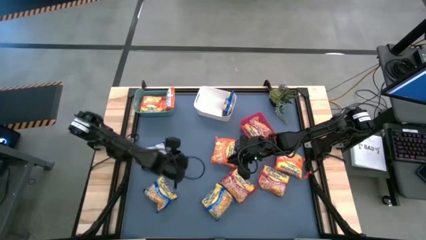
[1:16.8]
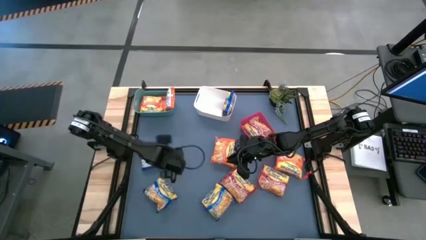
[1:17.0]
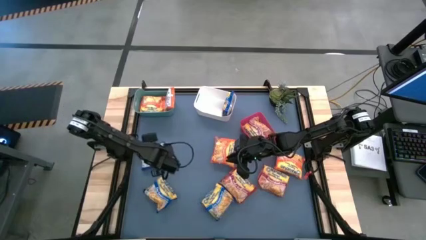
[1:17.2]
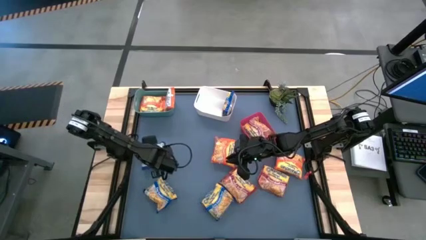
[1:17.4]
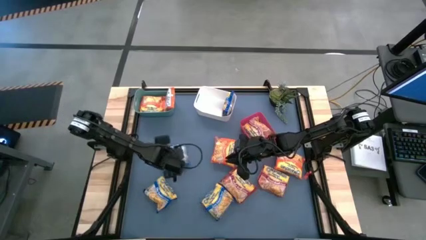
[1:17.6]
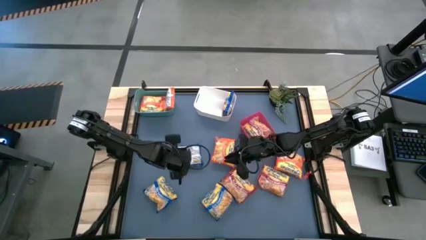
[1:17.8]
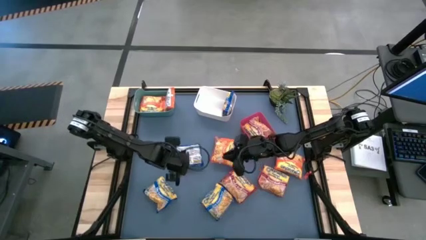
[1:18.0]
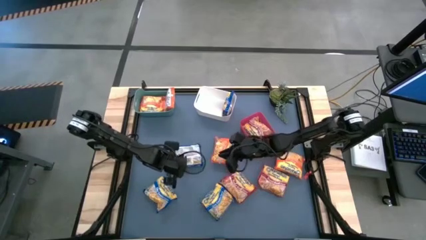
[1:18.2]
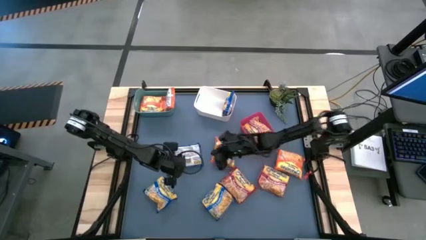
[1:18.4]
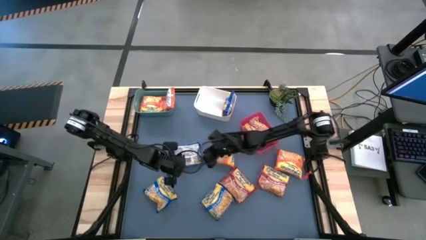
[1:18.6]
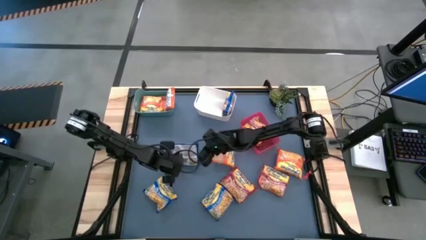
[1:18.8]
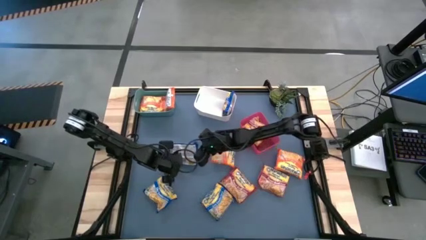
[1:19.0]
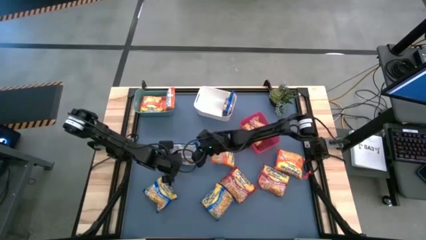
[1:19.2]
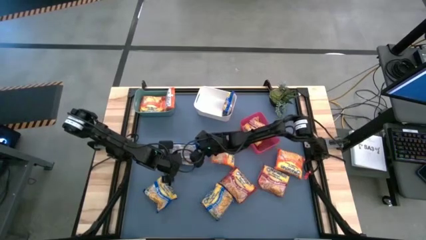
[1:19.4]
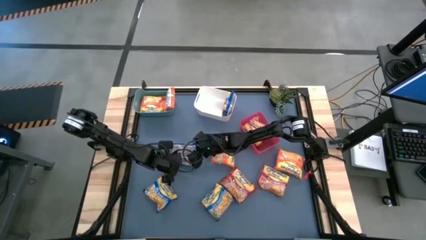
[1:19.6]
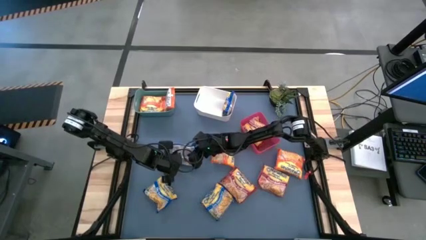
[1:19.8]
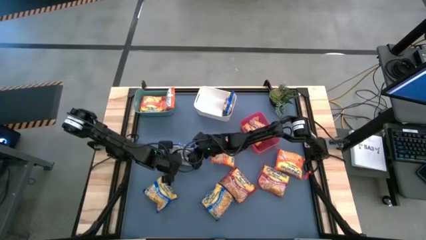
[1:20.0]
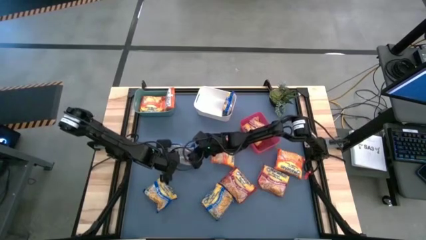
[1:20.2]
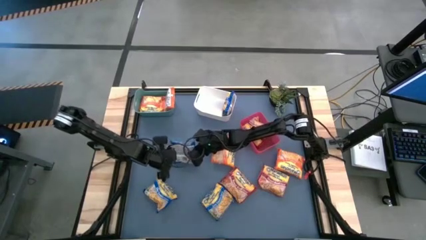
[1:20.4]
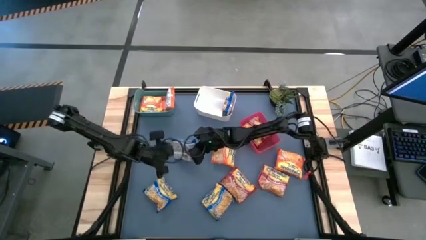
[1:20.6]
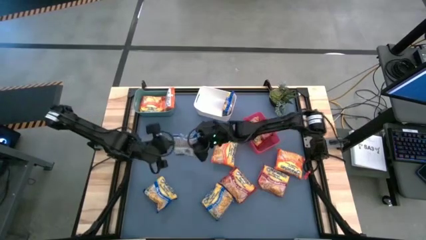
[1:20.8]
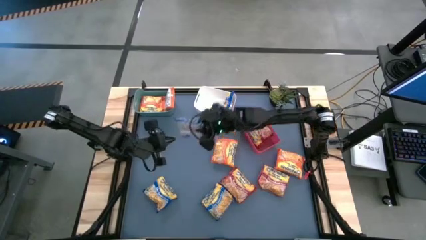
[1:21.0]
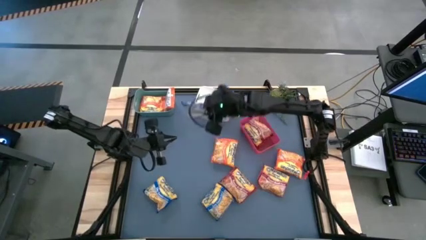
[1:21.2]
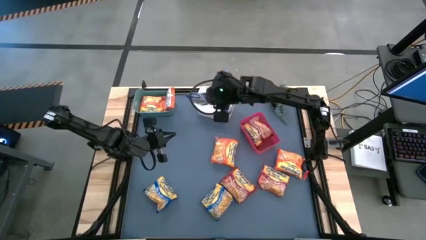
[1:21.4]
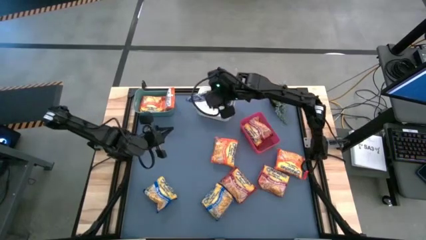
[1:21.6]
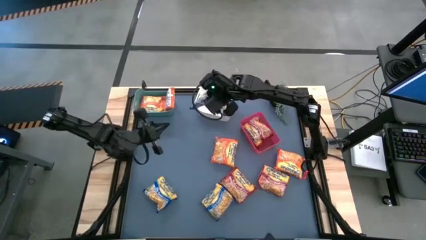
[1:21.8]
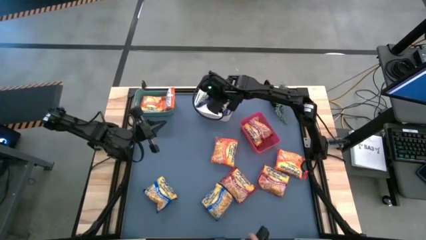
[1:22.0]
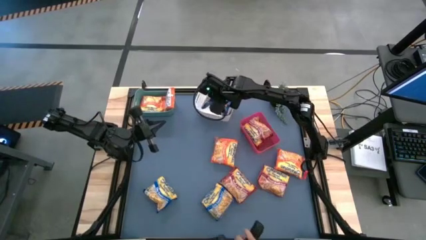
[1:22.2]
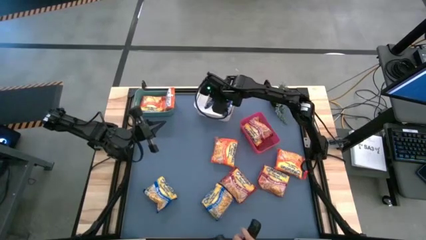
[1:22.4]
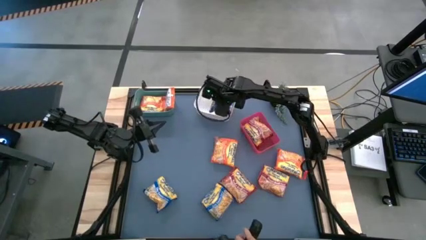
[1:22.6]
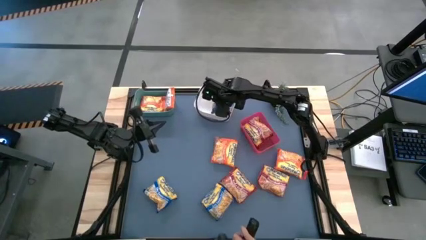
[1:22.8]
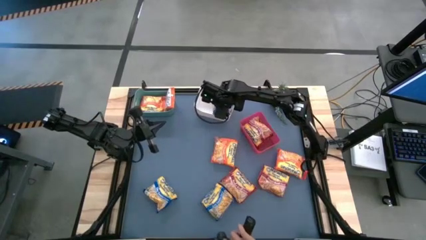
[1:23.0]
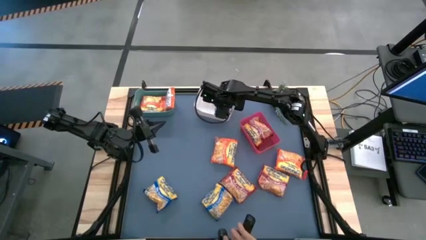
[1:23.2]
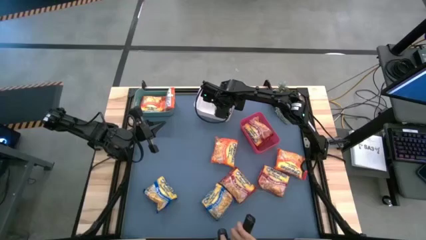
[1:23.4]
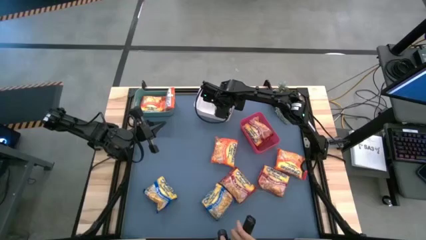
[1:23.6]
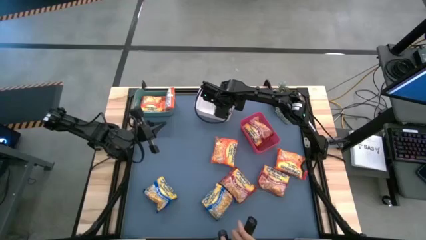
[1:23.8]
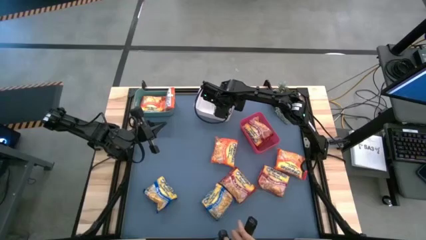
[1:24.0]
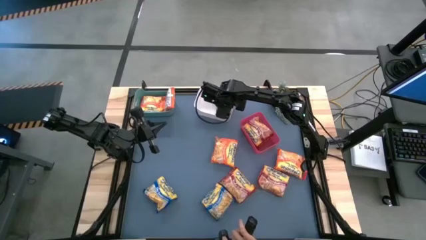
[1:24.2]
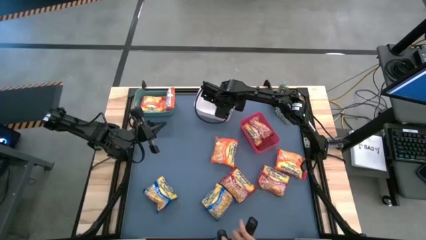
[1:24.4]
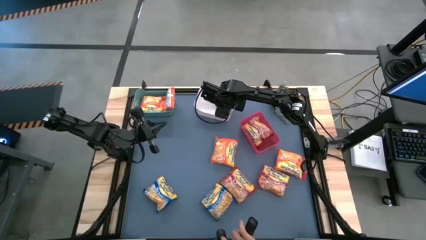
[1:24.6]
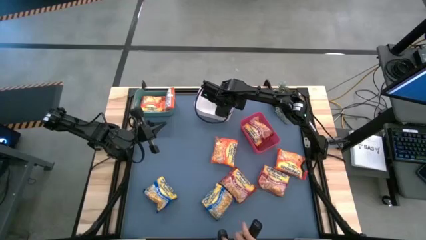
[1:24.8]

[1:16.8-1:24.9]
Task: Sort Maruchan noodles
Put the blue noodle pack into the white bin

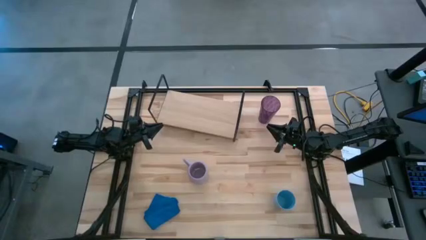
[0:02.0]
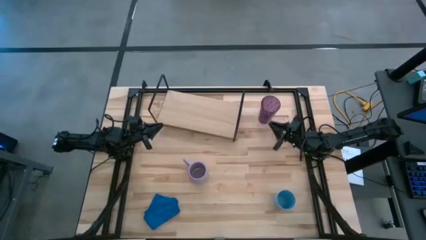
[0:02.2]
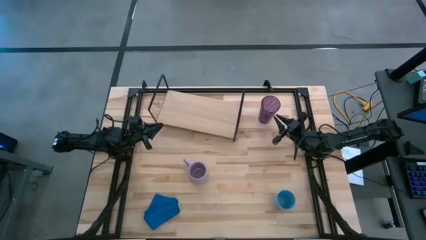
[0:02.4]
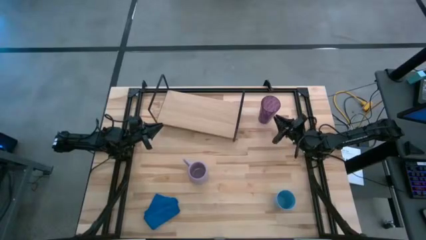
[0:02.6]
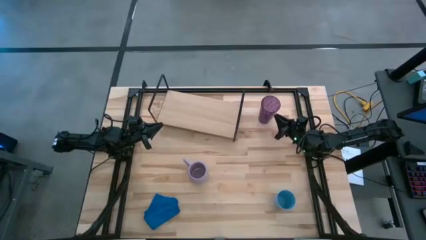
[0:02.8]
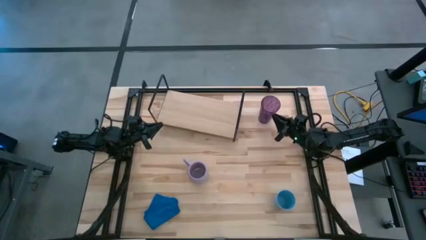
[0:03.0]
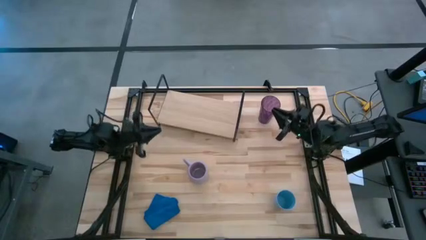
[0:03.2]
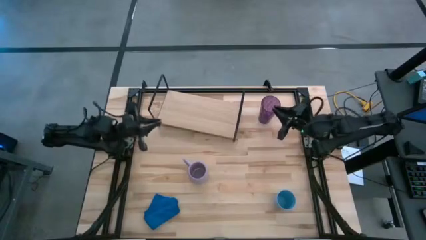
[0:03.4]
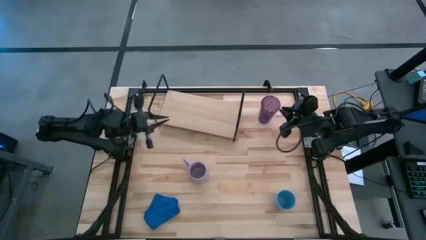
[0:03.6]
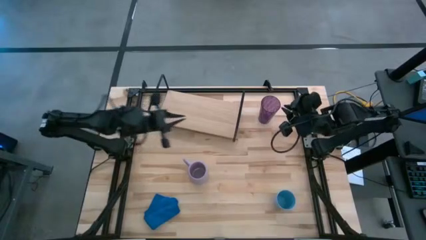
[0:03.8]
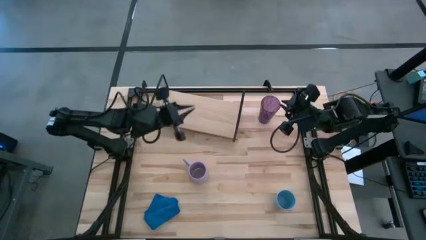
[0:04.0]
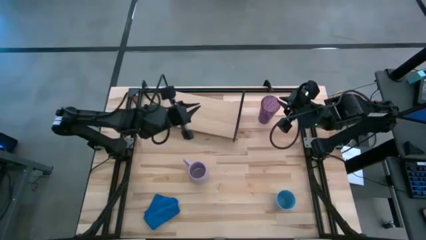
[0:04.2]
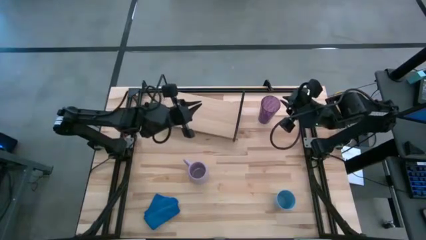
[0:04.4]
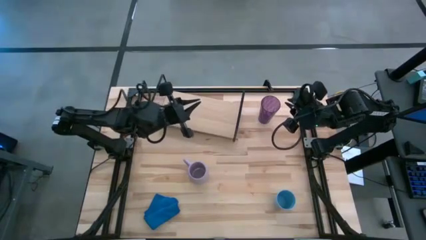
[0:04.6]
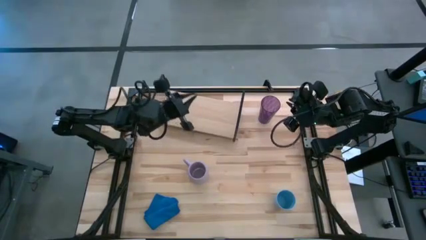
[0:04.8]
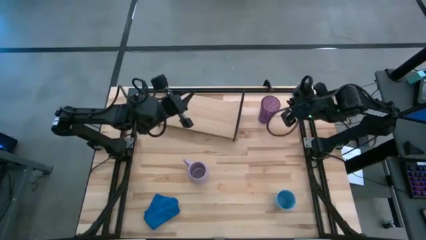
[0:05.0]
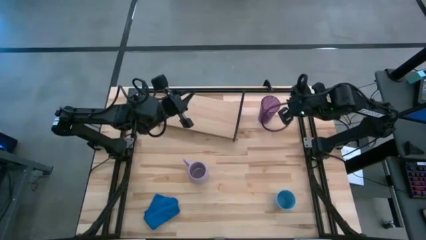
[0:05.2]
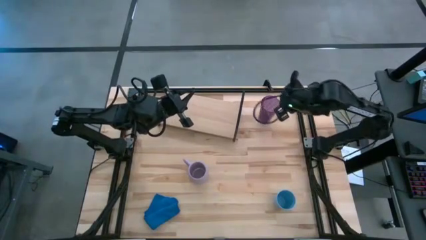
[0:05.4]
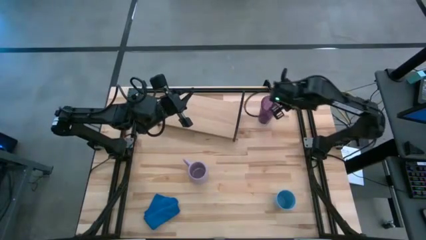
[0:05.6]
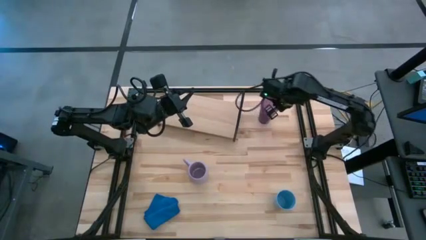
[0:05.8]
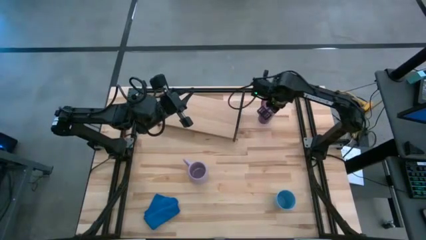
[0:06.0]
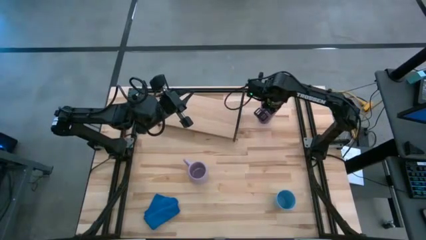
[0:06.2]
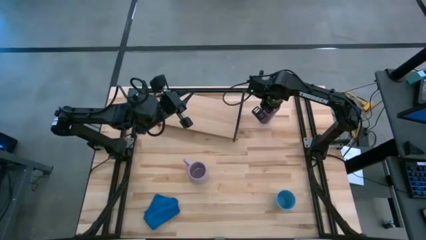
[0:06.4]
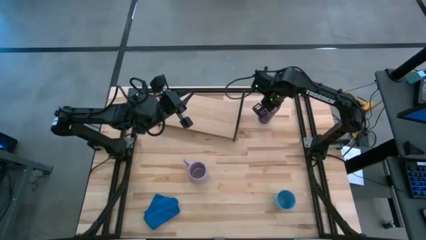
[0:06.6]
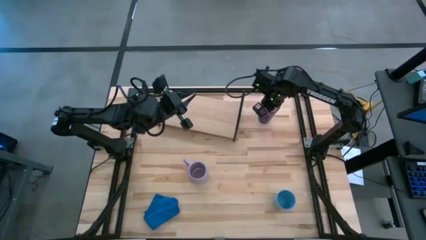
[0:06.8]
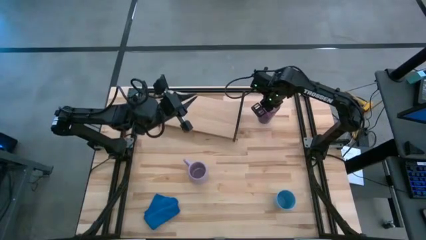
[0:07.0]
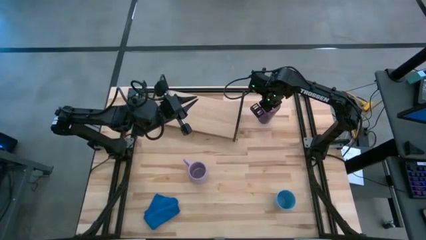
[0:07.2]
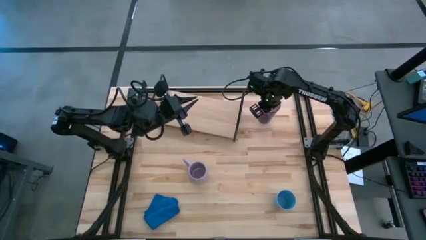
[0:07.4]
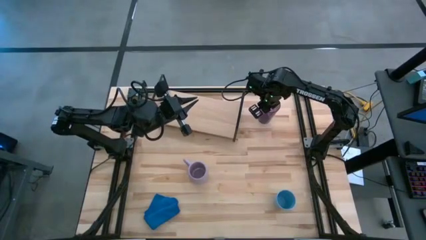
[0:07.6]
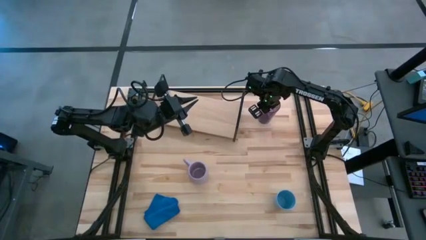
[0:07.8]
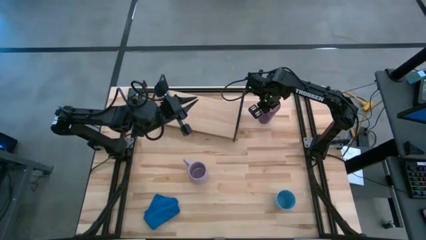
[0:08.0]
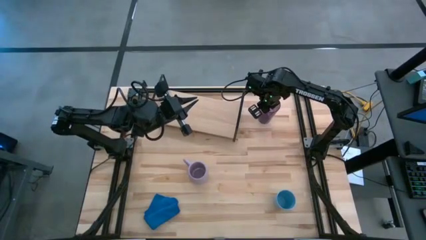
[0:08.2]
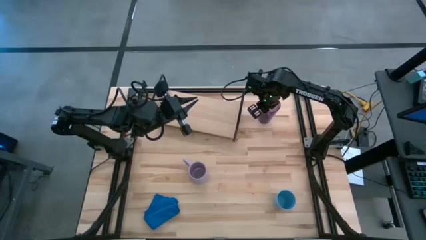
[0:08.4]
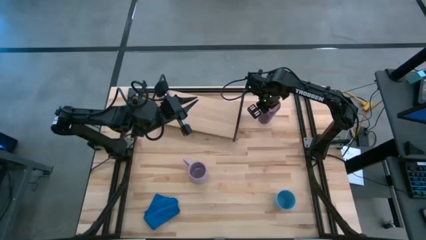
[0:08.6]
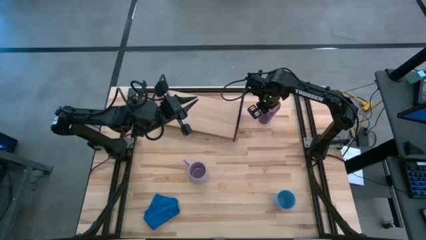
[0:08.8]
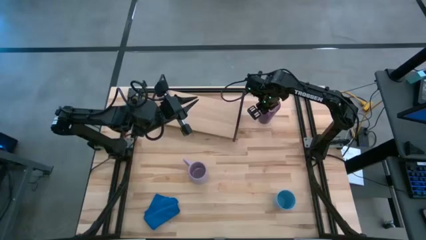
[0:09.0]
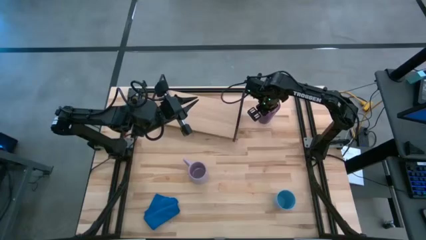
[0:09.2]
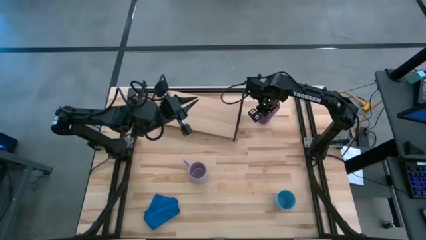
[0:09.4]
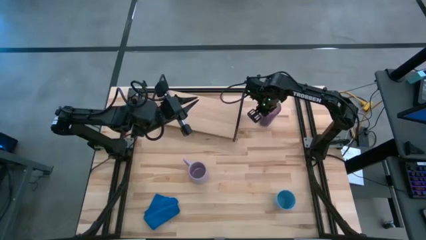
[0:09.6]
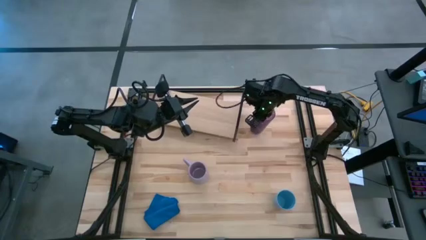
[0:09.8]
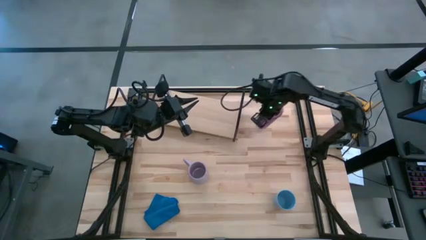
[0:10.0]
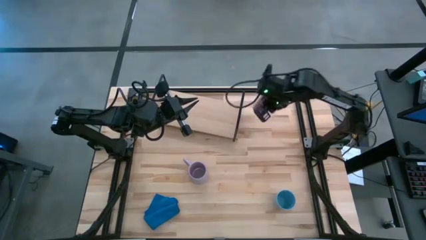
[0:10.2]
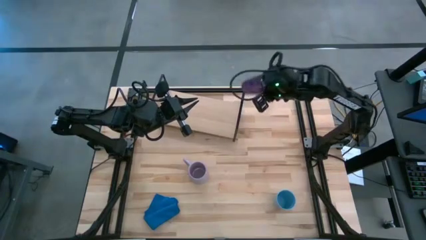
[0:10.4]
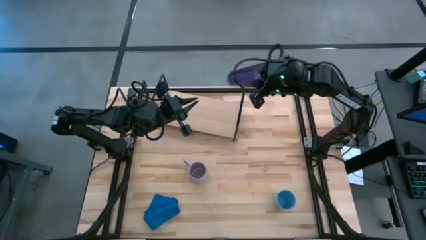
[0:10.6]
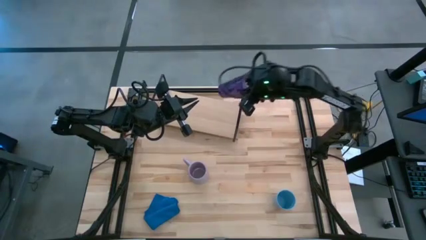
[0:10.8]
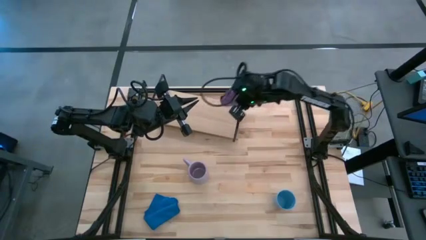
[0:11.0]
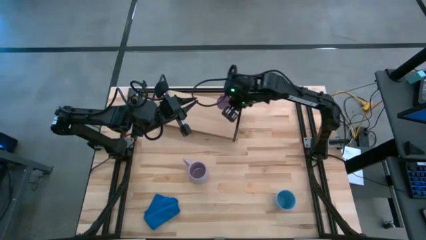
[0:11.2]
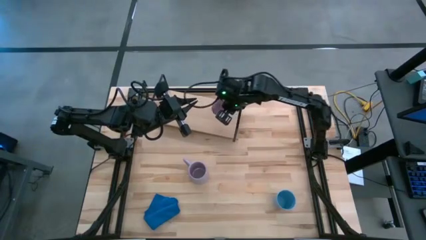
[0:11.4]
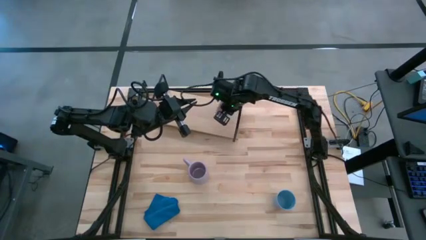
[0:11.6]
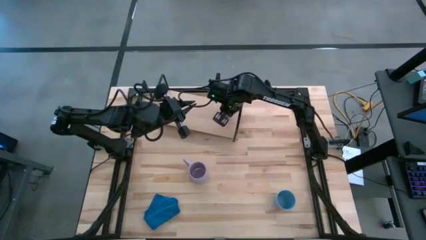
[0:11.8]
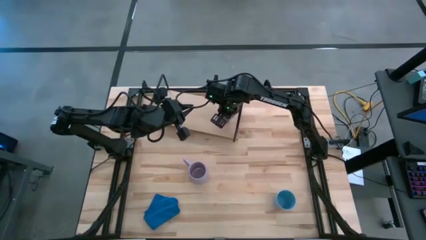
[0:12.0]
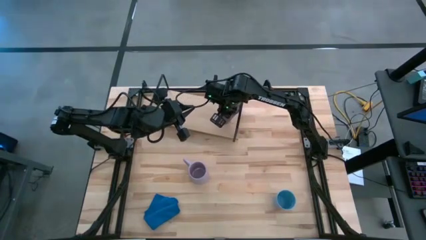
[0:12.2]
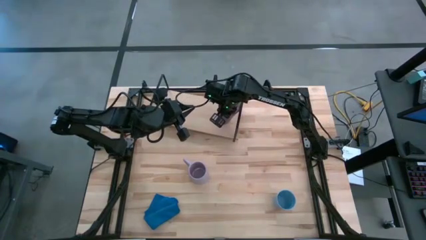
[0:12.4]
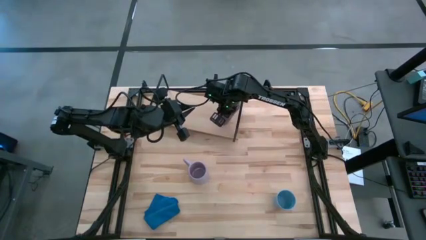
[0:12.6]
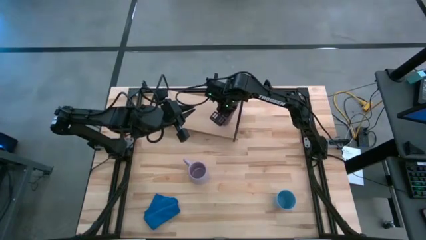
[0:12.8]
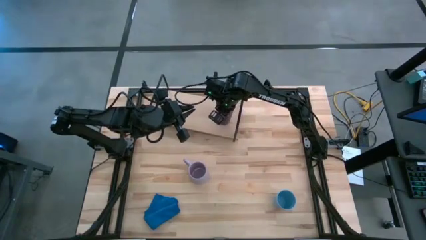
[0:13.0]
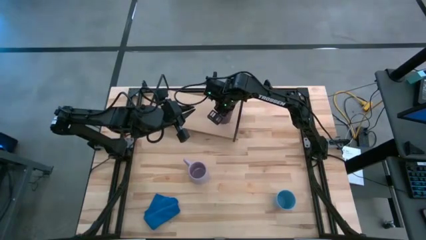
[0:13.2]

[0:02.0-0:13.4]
Task: Stack small to large cups/mugs on shelf
Put the violet cup on the shelf
